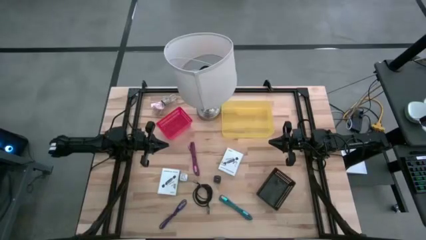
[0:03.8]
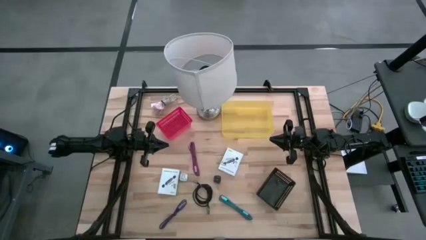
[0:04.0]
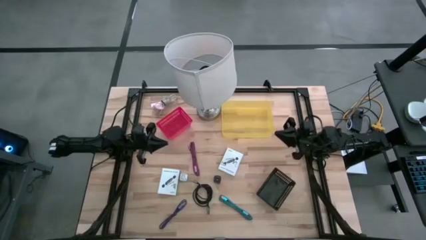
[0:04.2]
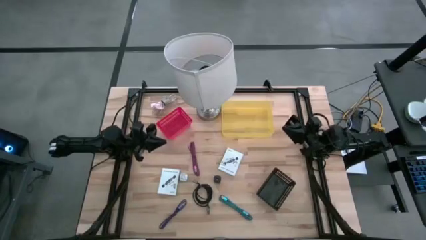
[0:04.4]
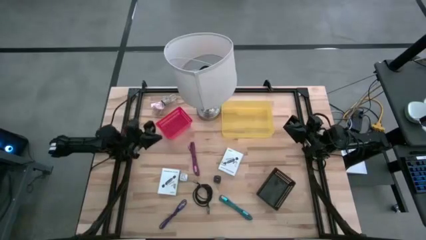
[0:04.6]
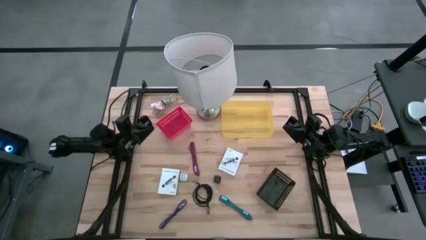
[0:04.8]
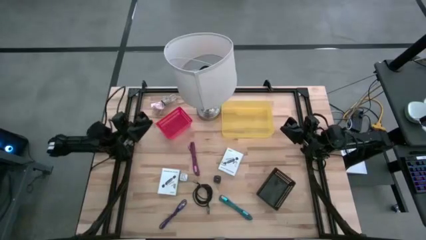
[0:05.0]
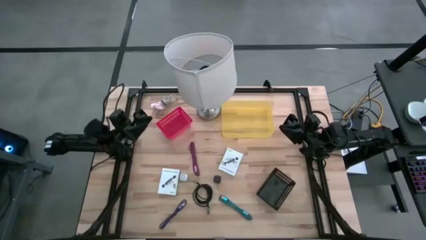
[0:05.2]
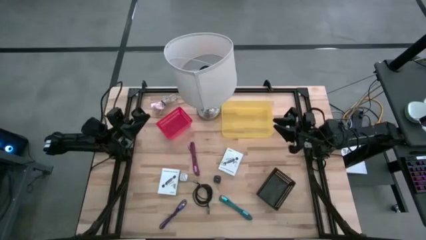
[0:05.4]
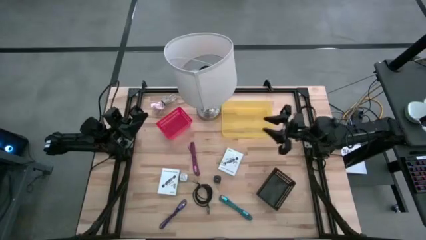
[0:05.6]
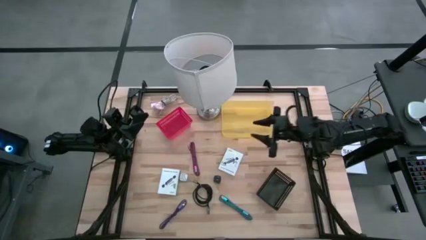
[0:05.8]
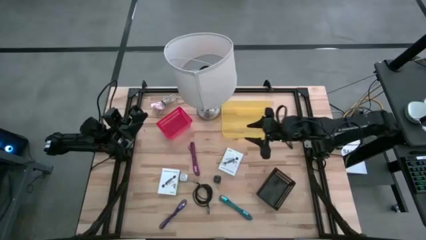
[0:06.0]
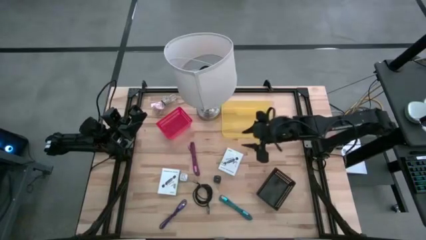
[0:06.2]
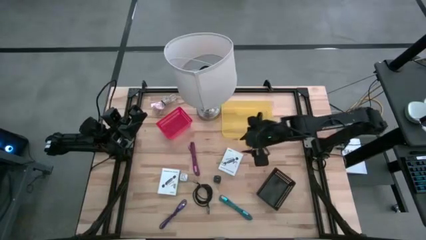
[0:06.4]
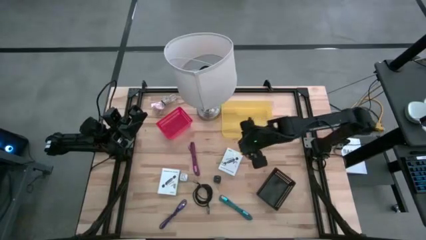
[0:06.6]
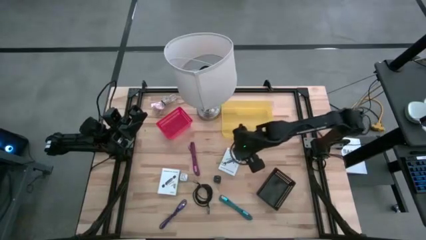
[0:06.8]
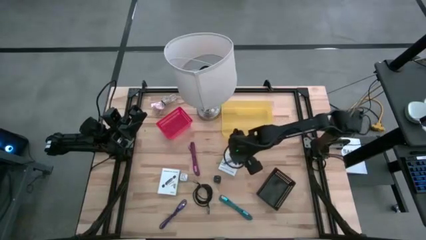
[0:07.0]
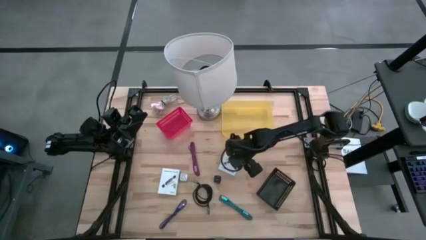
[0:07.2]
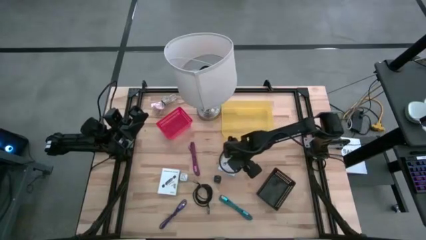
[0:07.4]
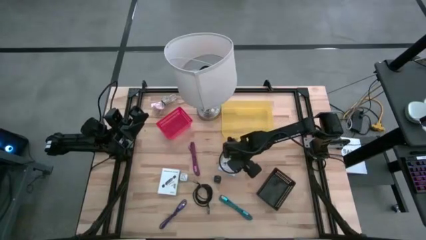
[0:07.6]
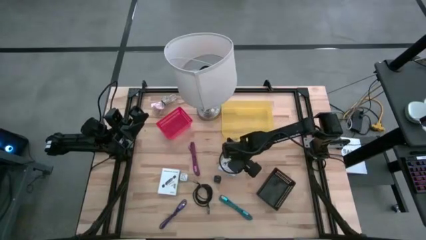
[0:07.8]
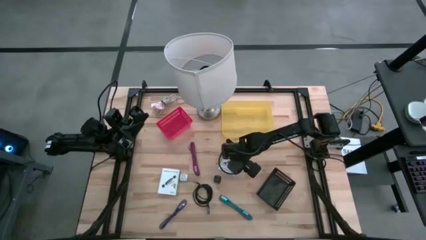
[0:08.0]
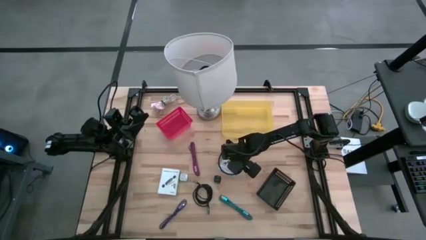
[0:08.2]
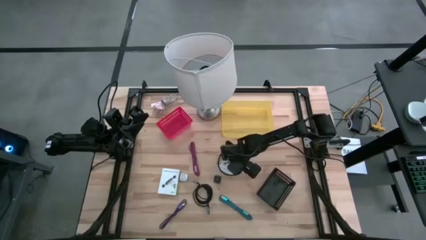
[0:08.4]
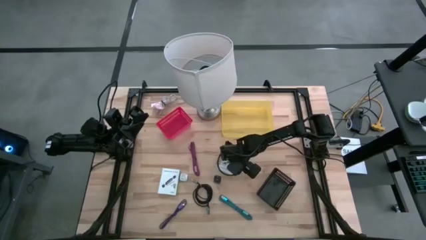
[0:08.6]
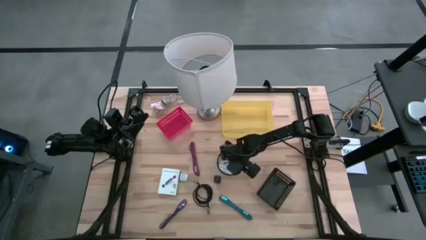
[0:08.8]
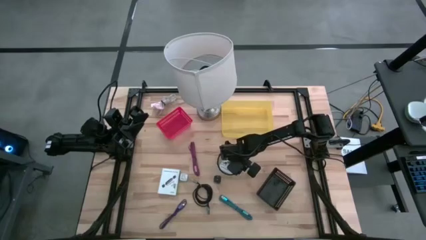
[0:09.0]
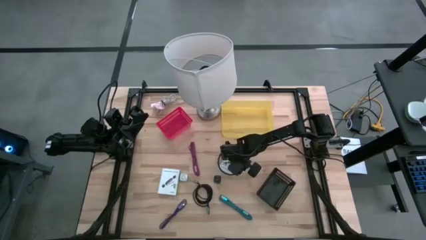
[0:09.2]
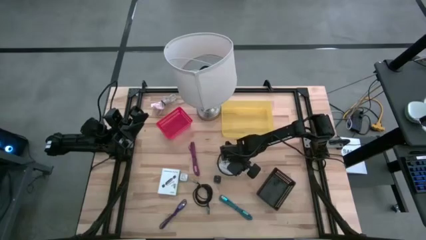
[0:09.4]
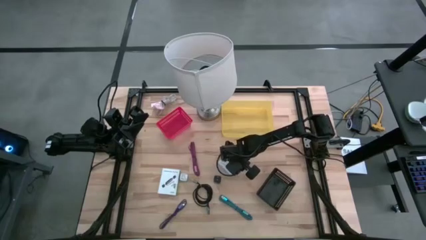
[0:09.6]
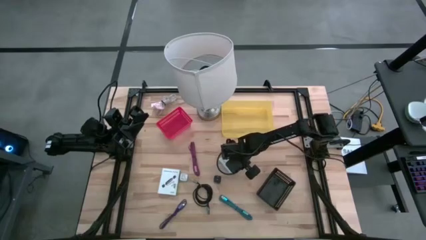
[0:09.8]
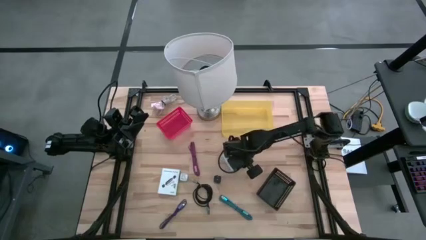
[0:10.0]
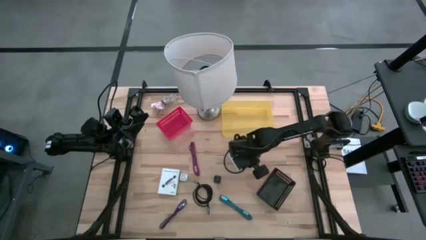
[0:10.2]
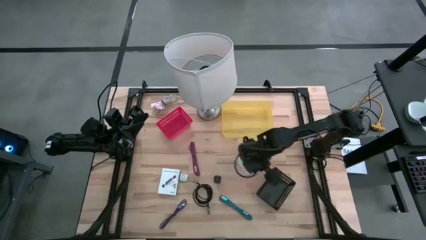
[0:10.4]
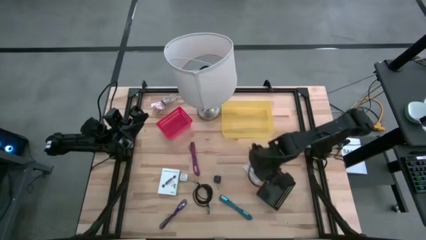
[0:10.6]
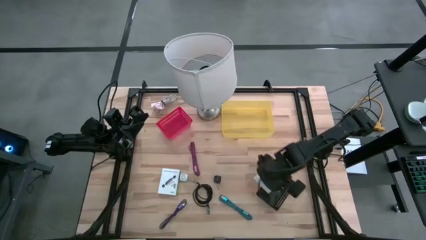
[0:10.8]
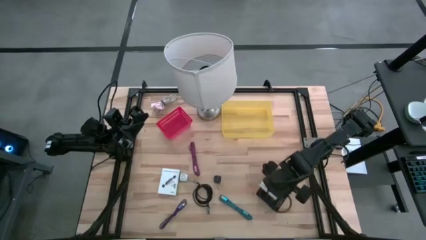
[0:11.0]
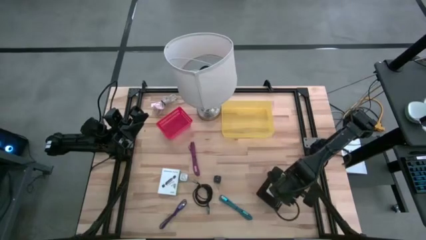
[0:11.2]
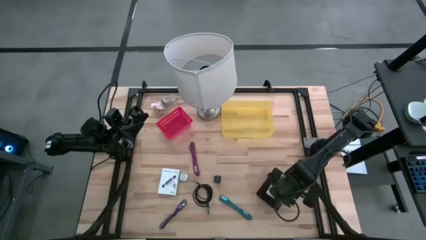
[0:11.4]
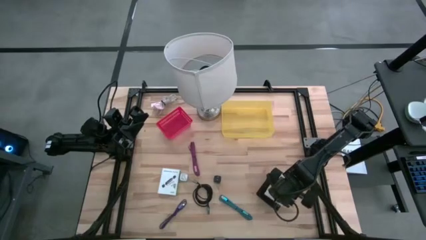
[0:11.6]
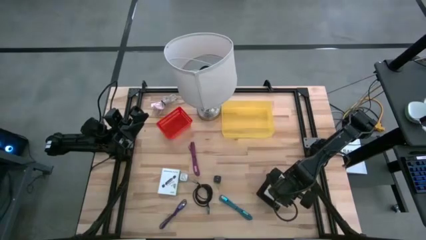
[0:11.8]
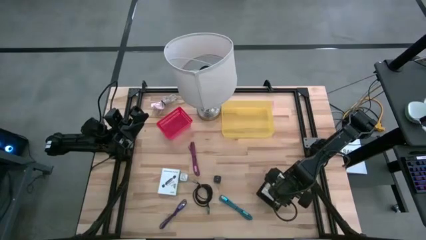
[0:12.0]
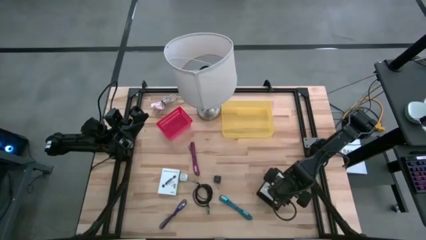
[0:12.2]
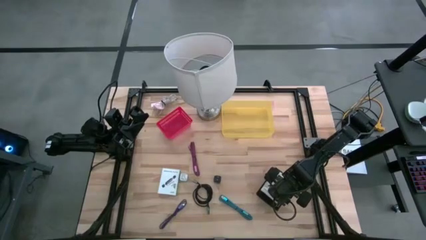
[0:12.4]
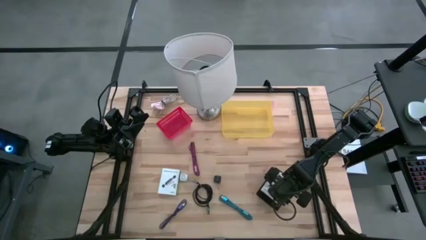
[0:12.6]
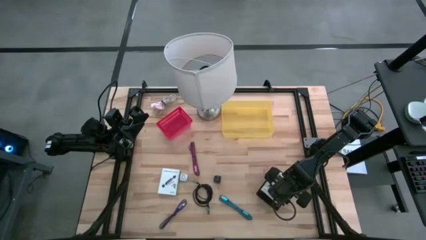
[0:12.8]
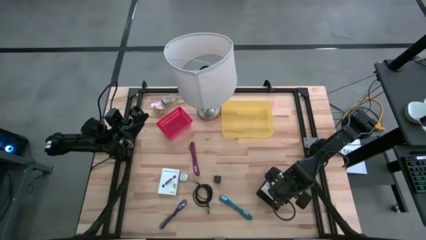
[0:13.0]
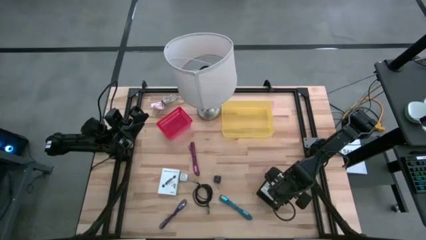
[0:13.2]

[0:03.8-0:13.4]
Task: Pick and place items into bin
Put the right card reader box into the black bin

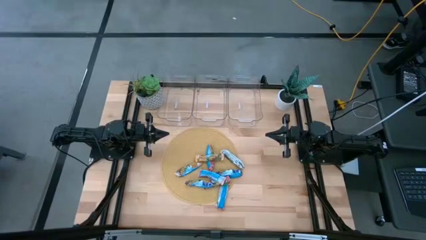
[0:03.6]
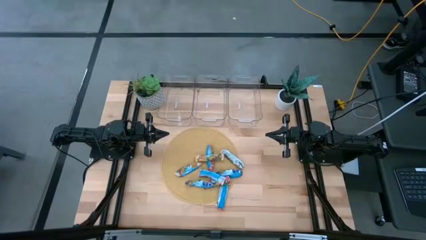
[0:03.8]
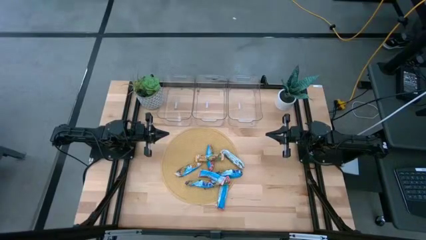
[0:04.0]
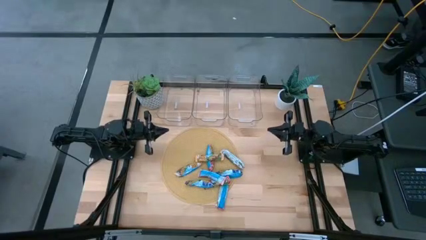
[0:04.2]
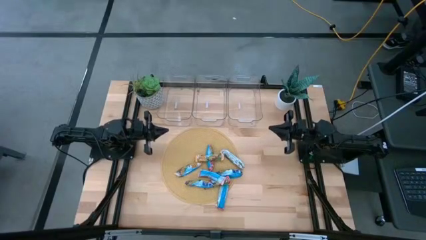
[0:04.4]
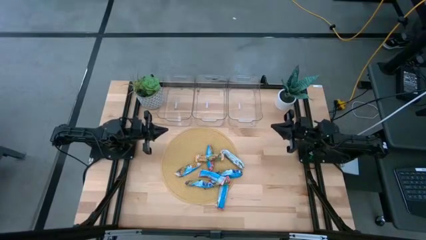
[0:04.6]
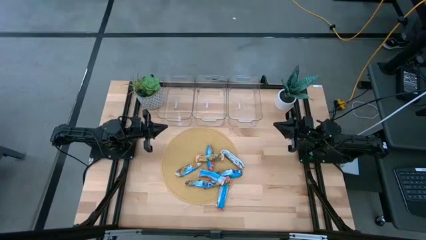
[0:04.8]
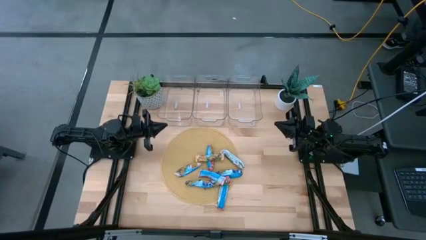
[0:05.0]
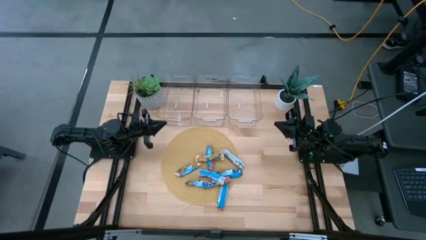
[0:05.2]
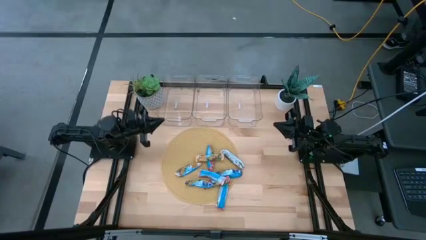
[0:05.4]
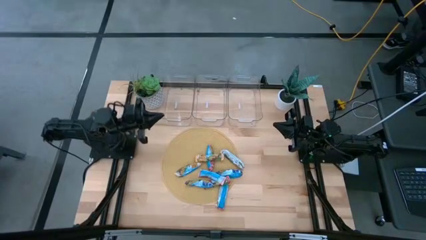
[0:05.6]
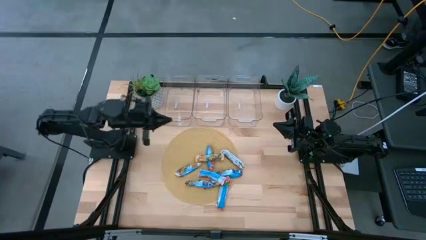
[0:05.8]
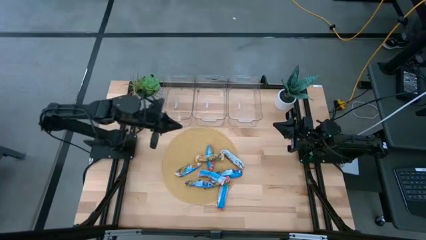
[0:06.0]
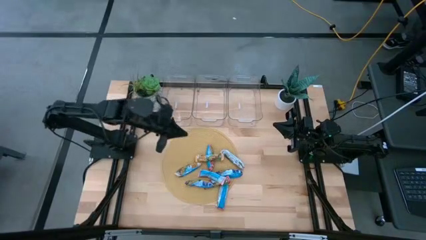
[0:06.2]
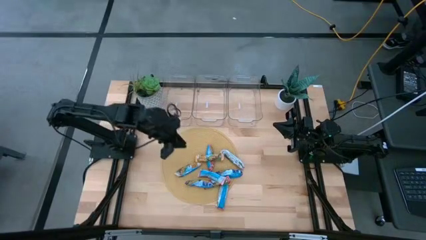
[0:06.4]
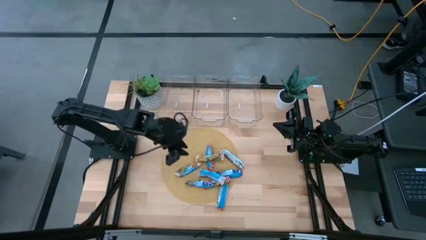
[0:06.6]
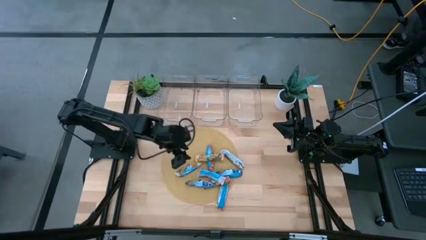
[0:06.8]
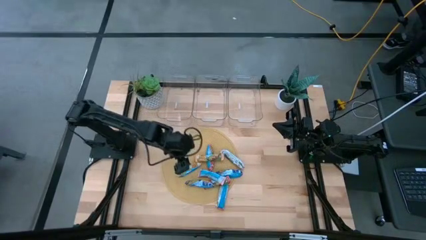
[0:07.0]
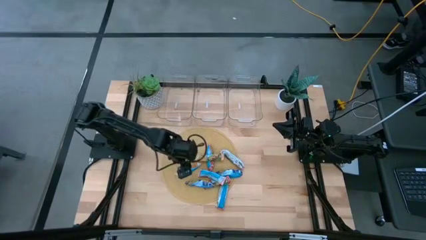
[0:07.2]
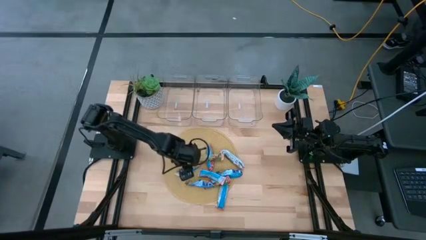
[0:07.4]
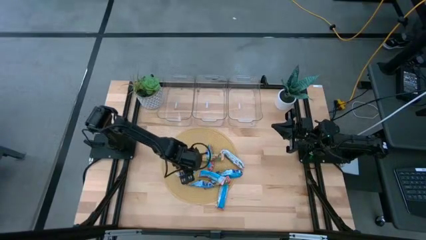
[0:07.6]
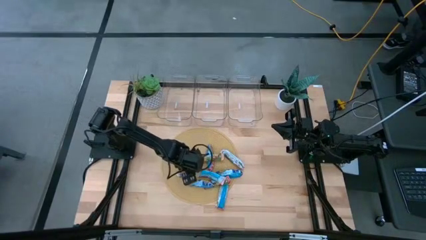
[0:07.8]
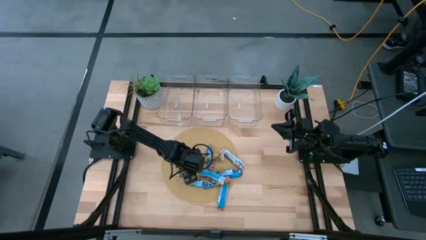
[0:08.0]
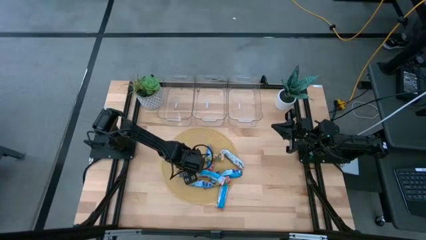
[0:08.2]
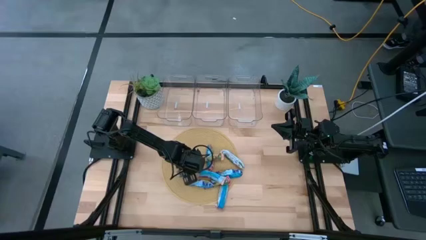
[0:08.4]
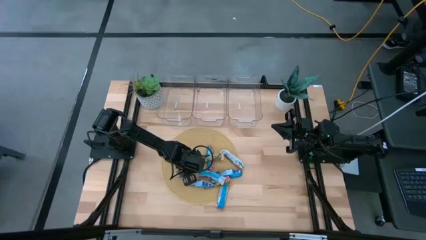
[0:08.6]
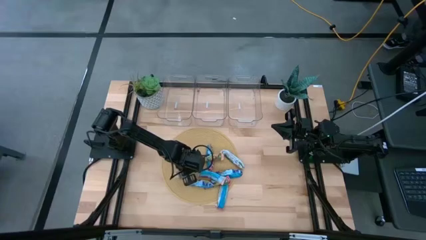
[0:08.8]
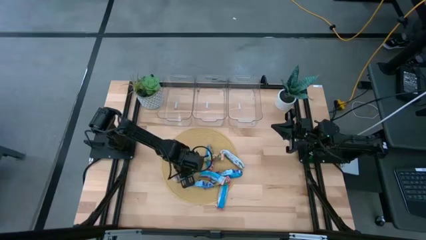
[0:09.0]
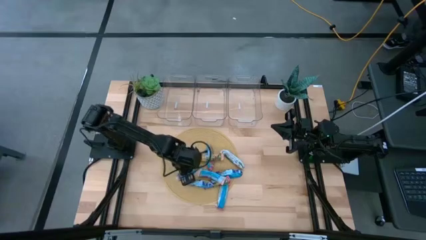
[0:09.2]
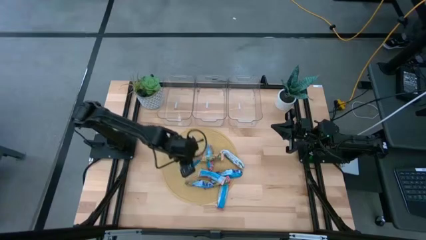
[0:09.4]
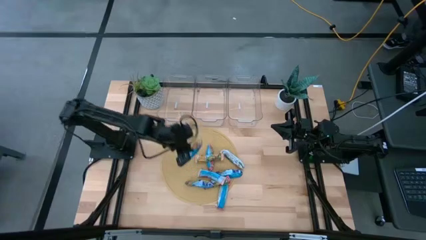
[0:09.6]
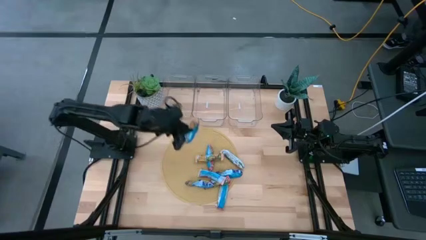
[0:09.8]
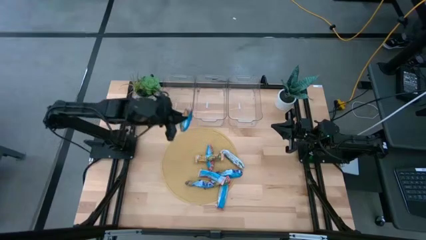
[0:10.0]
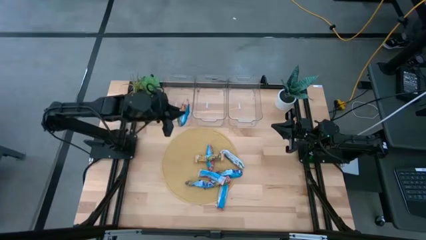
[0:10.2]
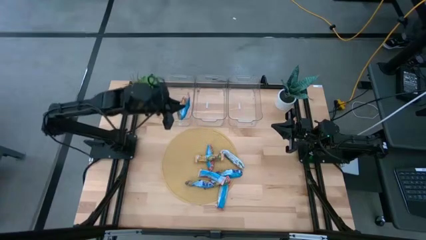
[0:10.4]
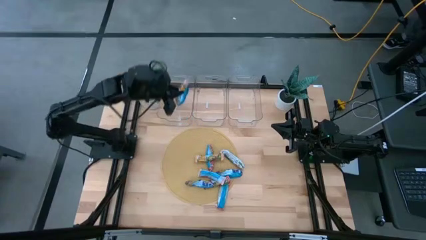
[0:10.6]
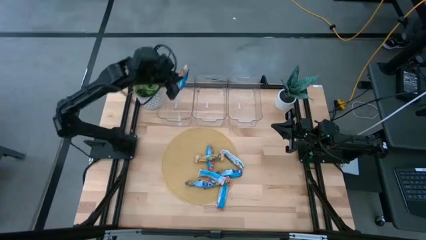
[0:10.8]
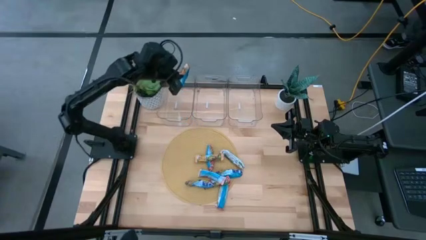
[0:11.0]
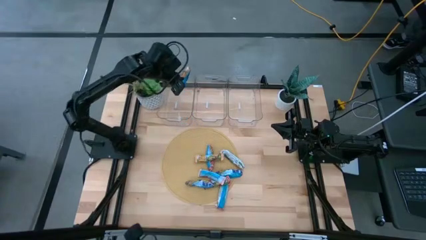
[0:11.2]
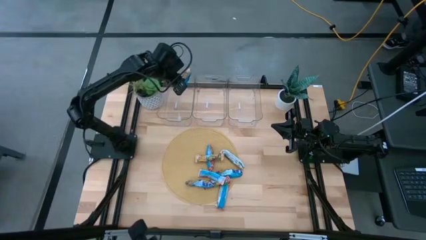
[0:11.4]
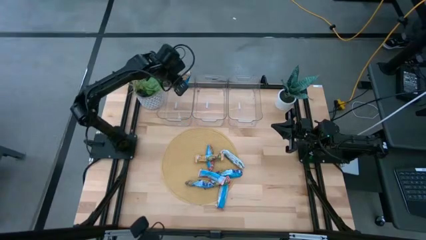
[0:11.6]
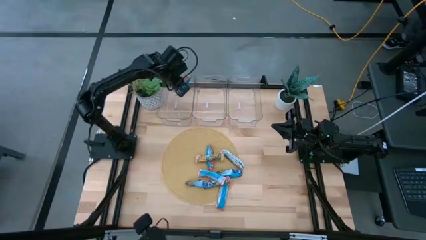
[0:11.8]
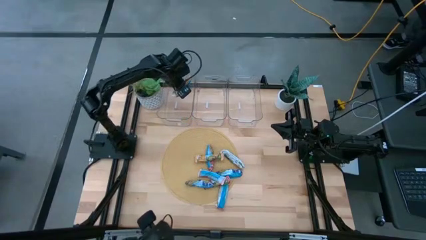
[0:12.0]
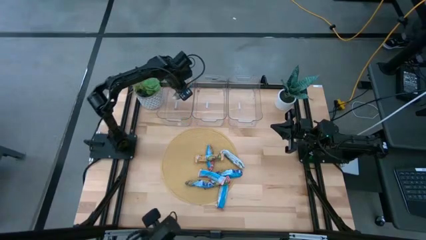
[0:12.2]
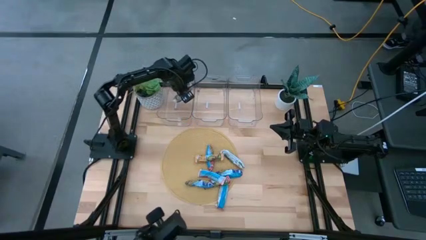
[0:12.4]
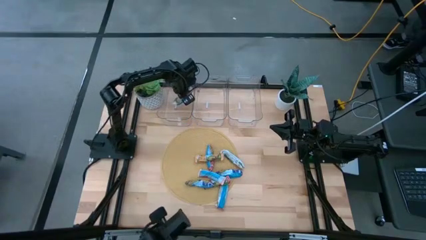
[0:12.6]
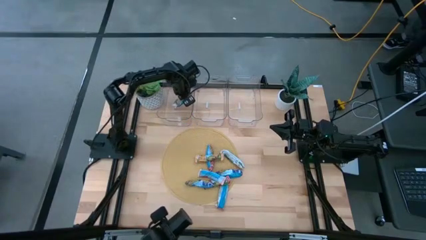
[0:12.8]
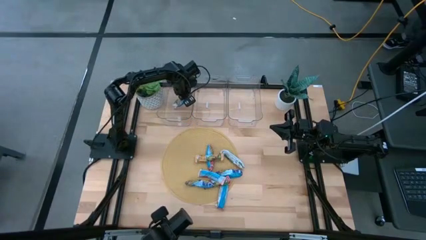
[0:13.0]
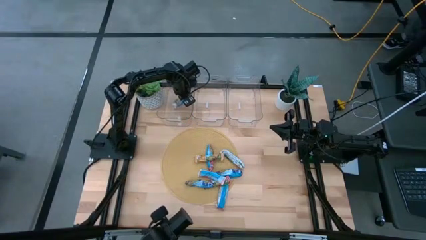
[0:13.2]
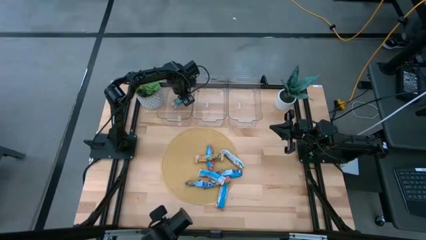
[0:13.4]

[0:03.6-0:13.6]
Task: Pick and place Granola Bars by type
Put the yellow granola bar into the left transparent bin
